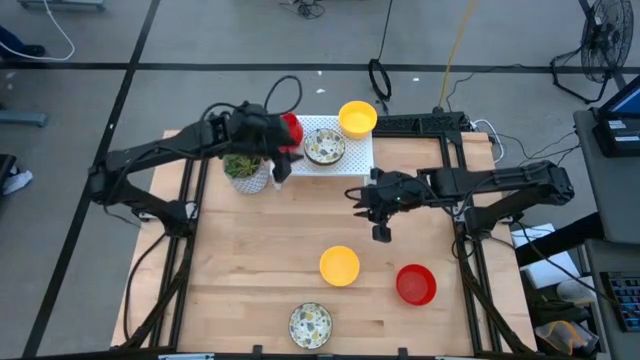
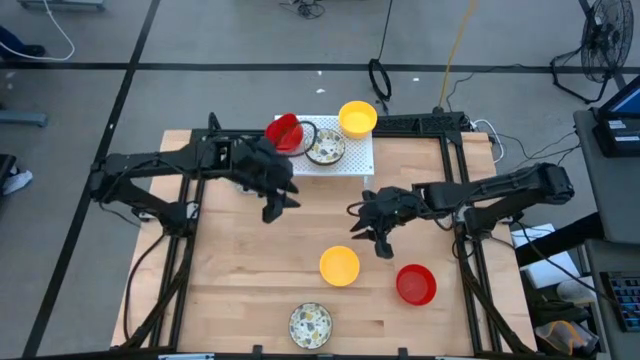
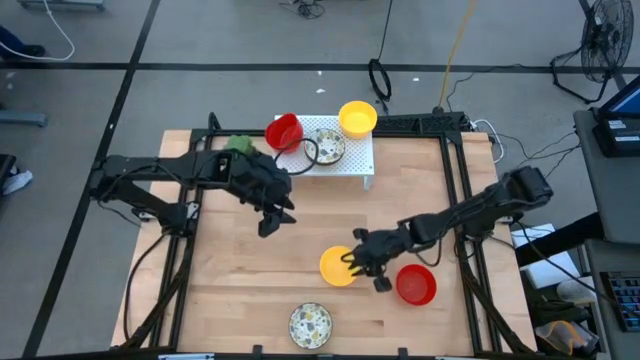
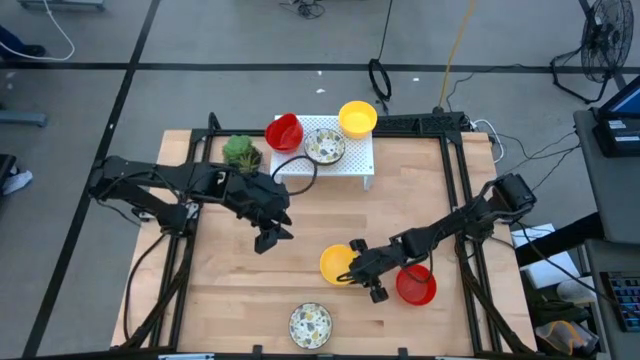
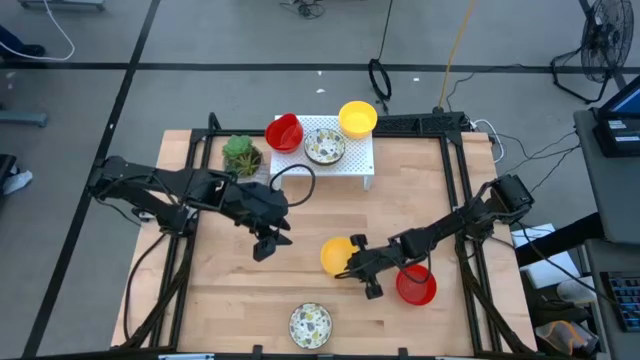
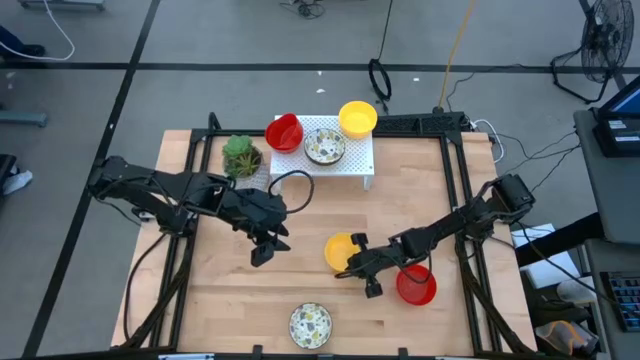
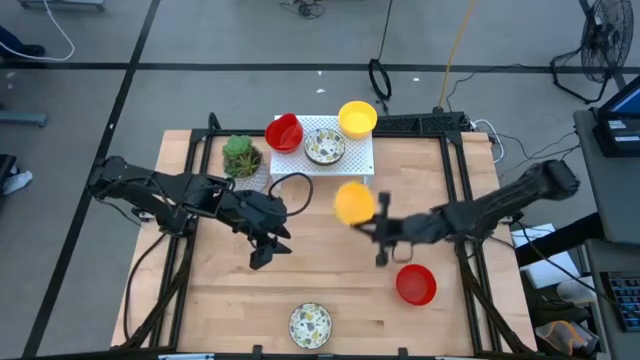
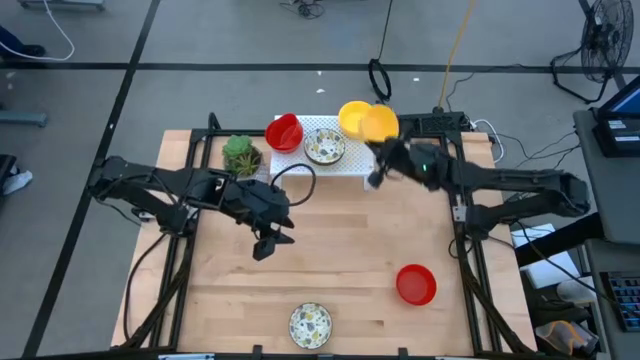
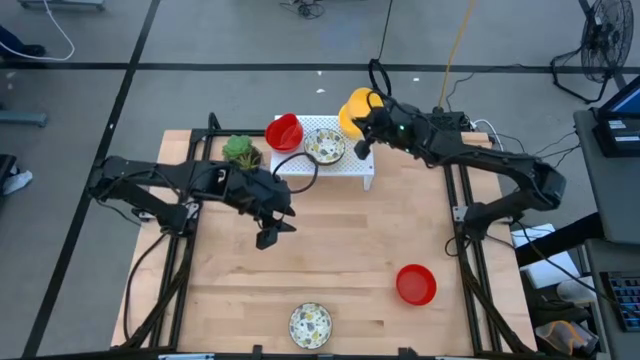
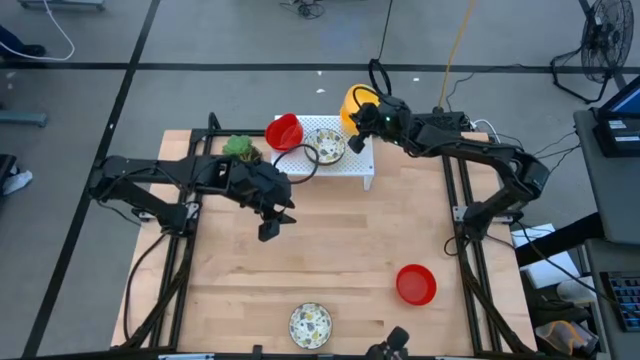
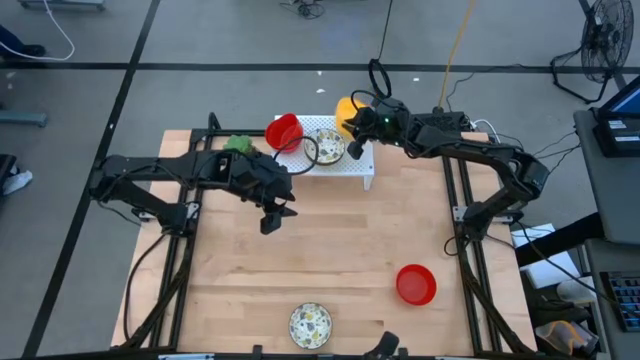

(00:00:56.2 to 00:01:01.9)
Task: Pick & Place Mini bowls
Stack the yellow bowl on the yellow bowl on the shelf

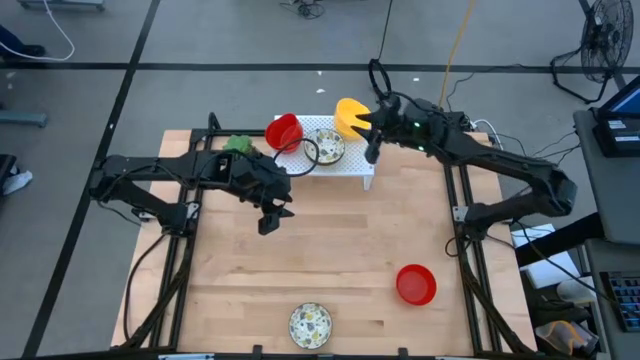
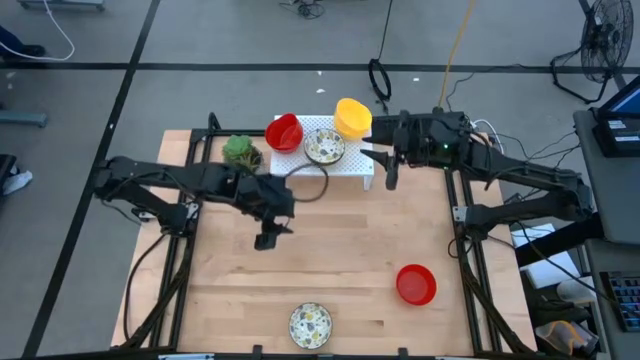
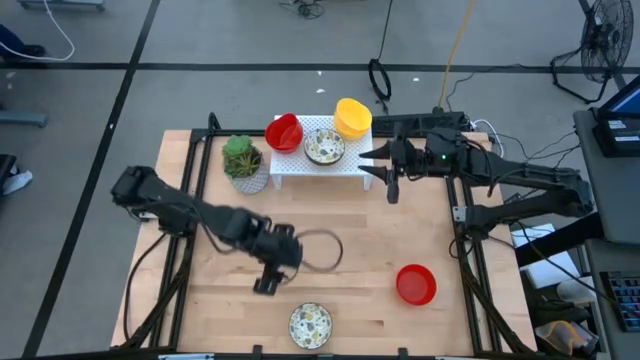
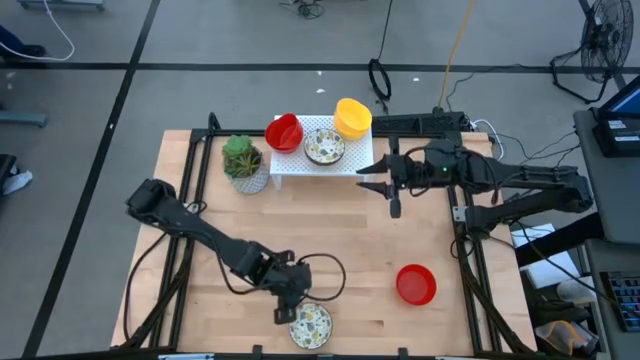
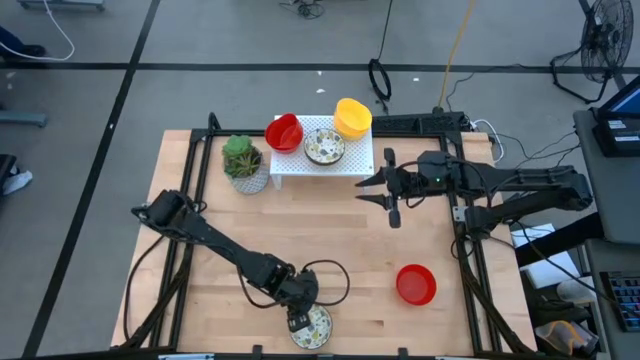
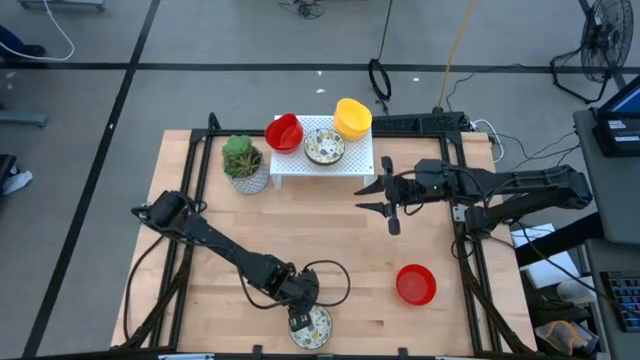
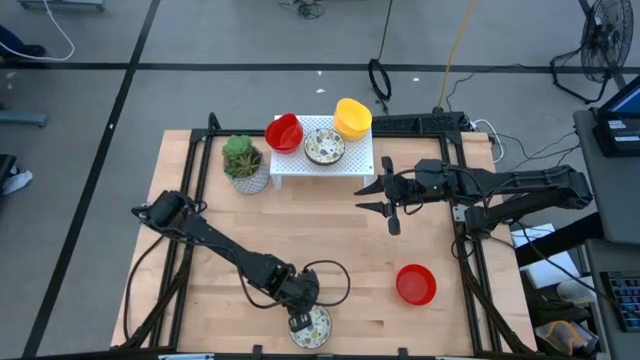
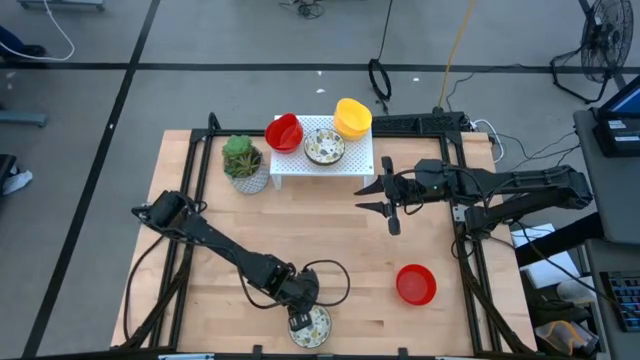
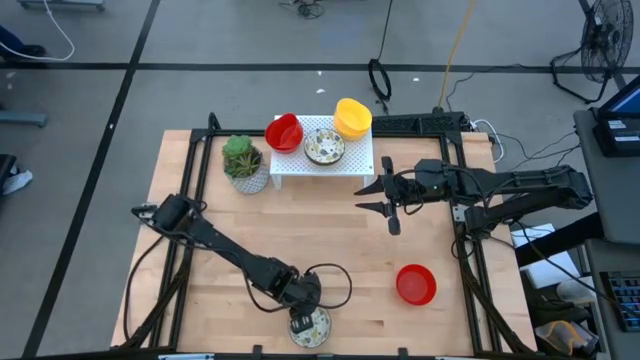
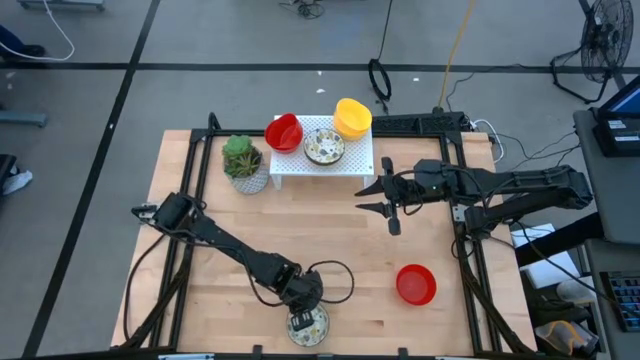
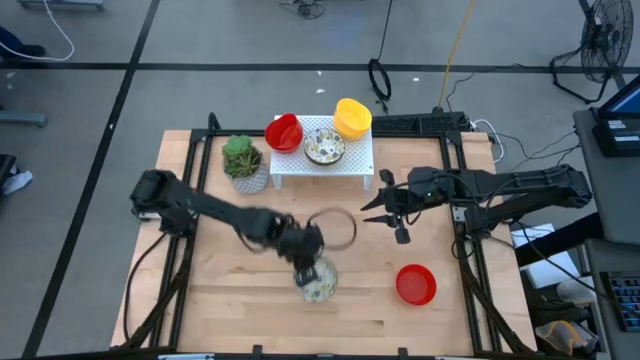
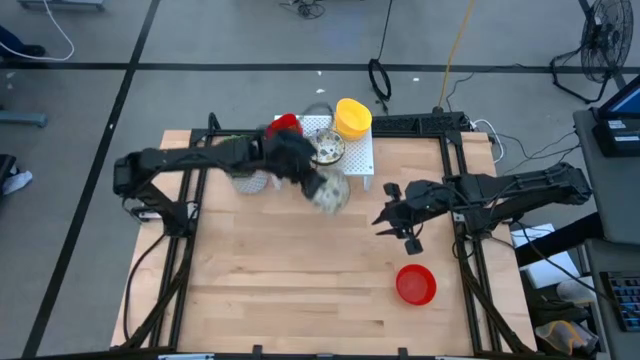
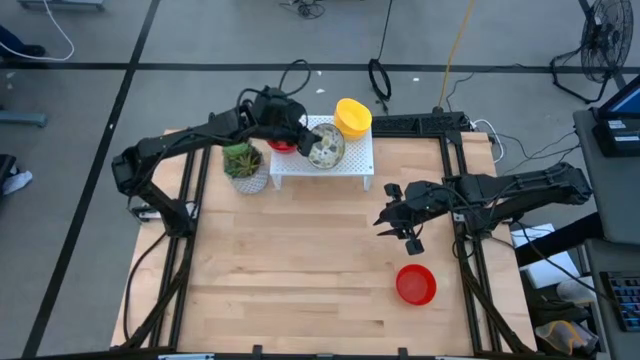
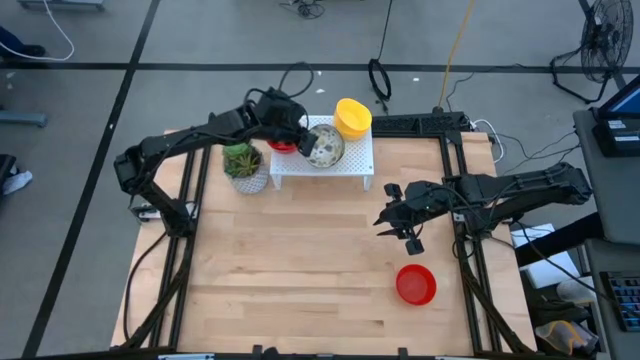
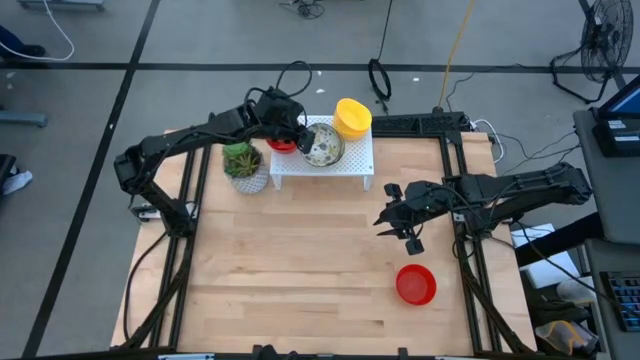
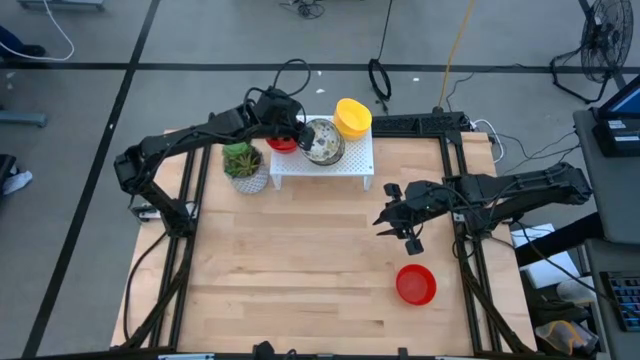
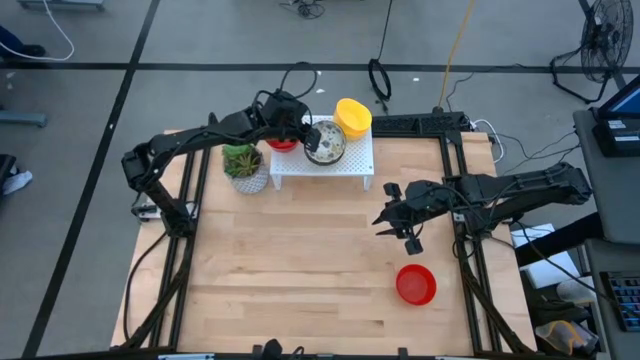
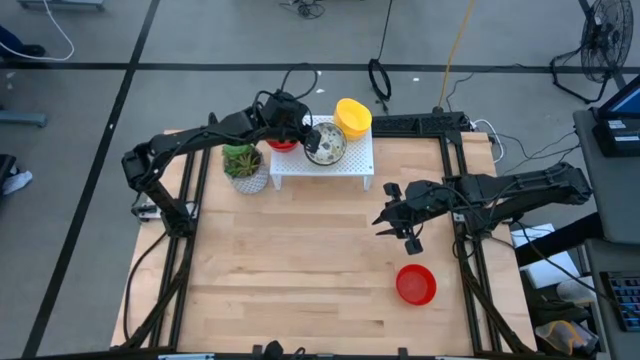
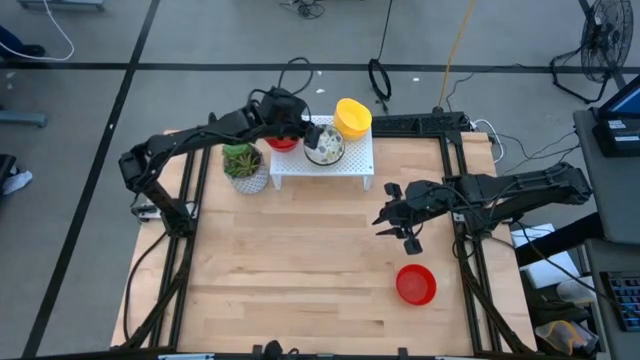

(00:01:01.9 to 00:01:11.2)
Stack the white patterned bowl on the white patterned bowl on the shelf

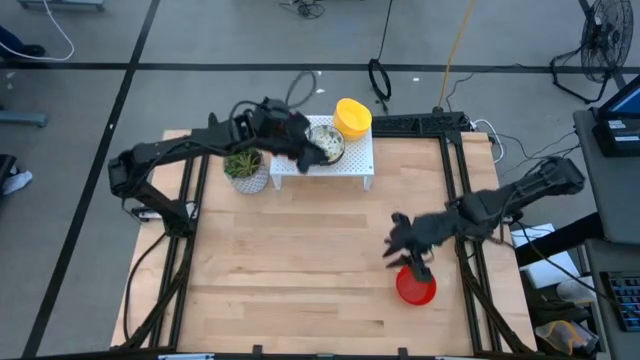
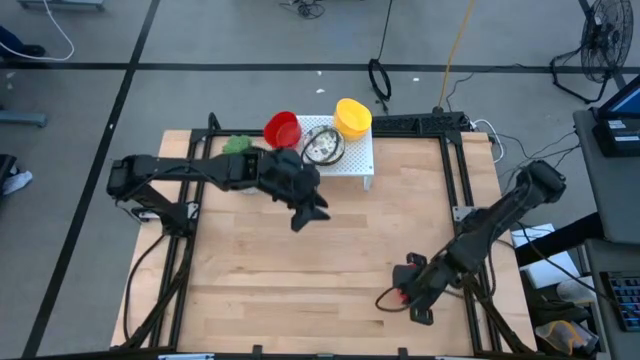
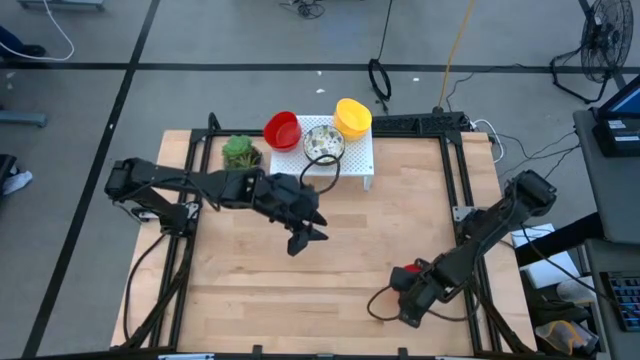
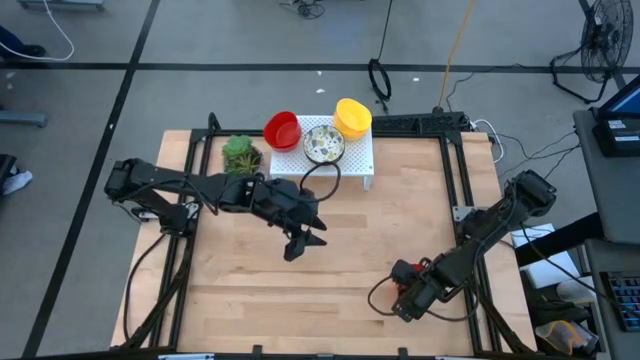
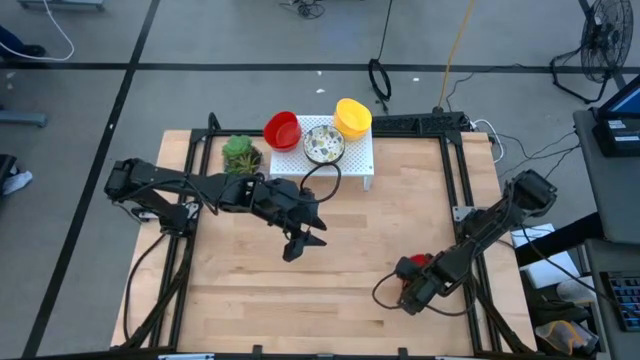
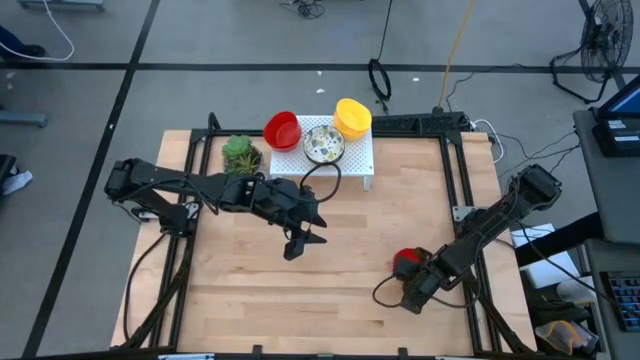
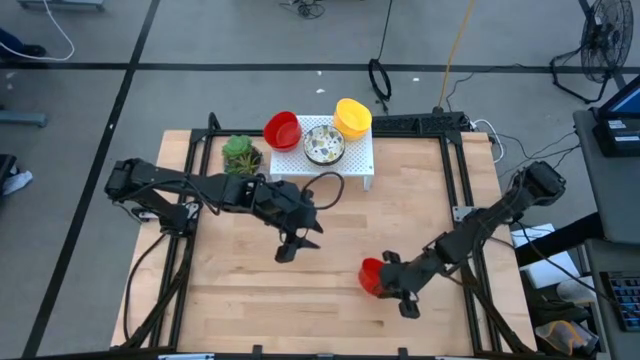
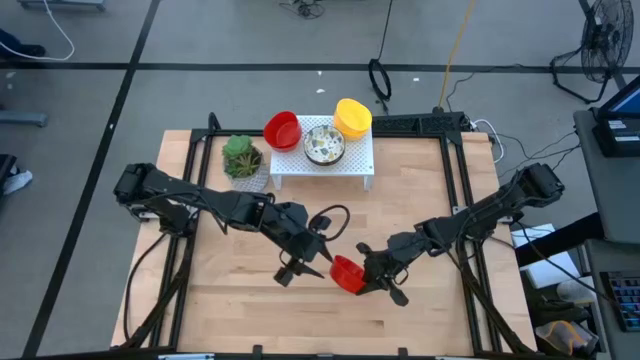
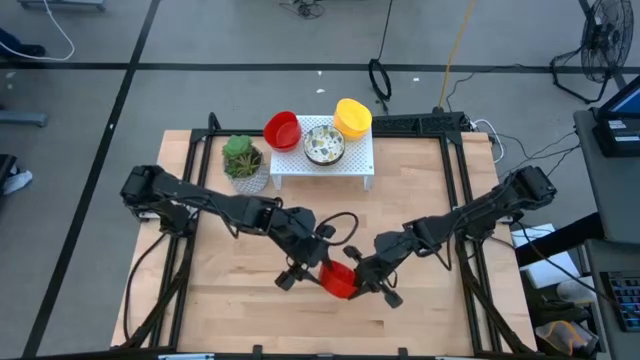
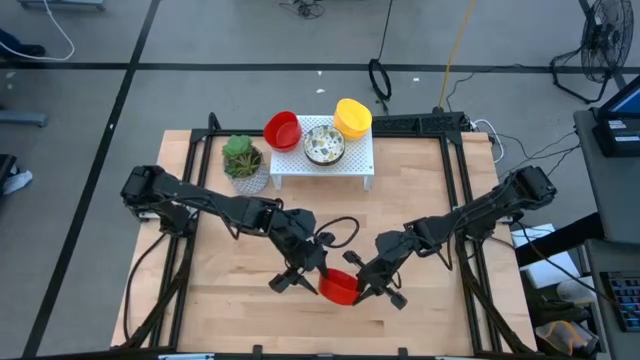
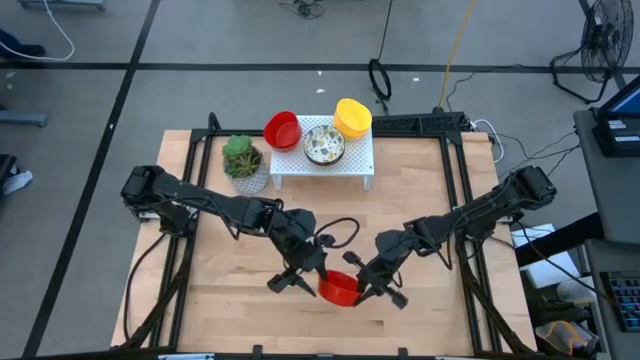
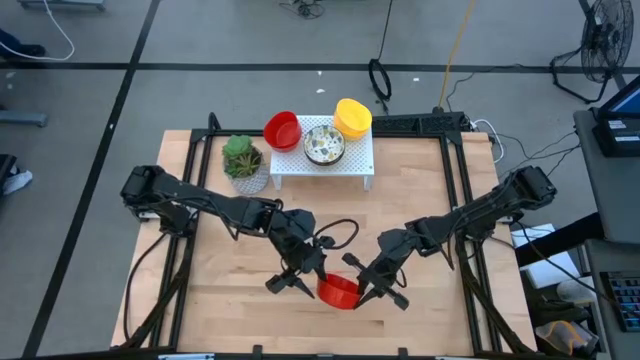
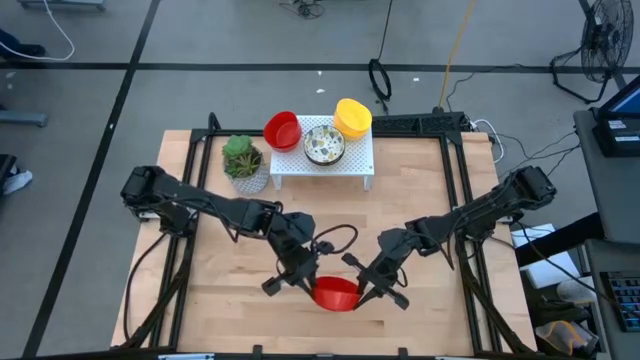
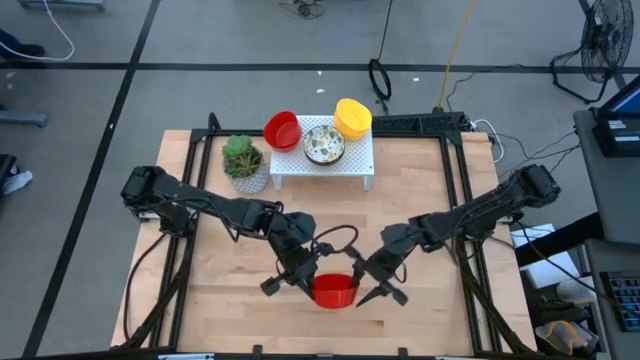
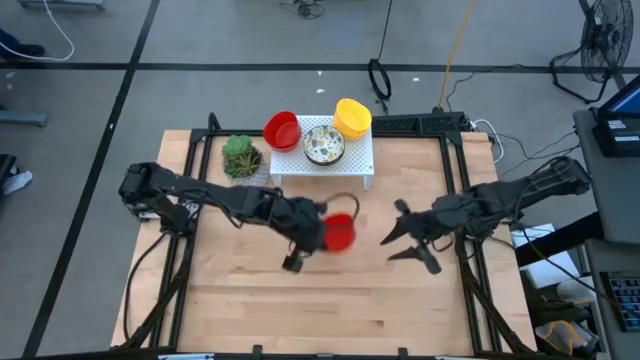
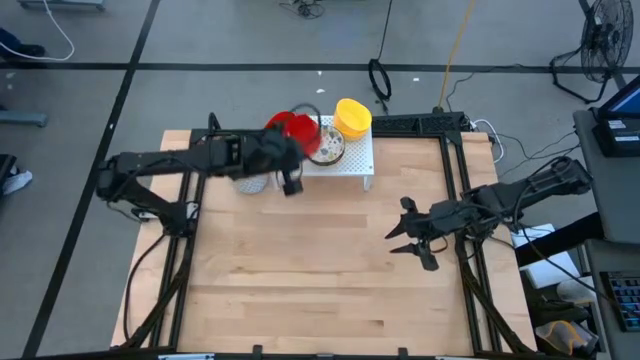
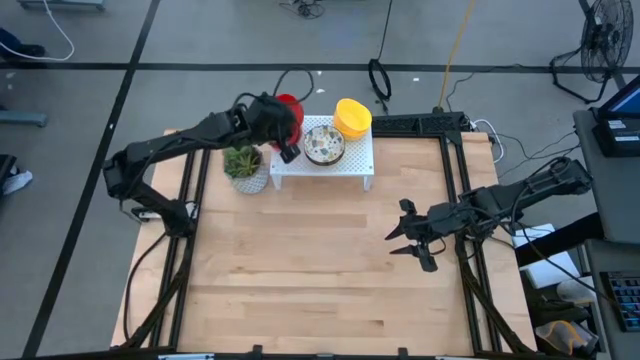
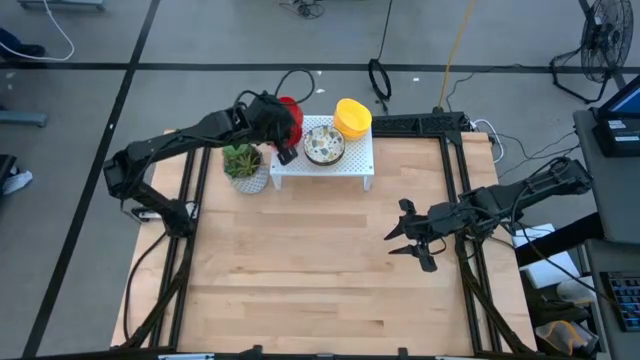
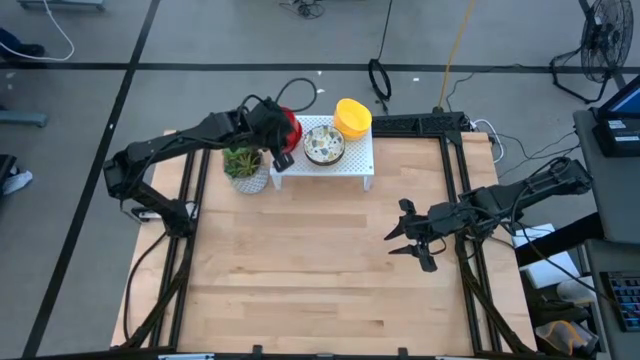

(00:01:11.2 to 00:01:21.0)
Stack the red bowl on the red bowl on the shelf
